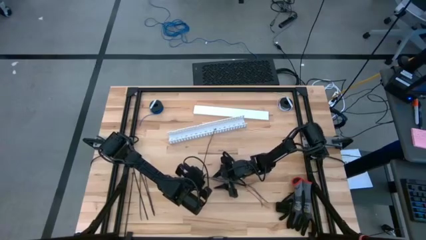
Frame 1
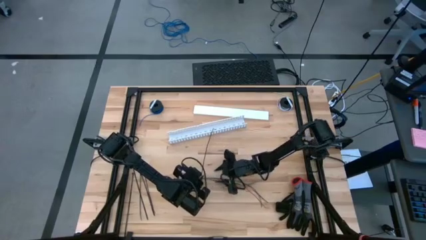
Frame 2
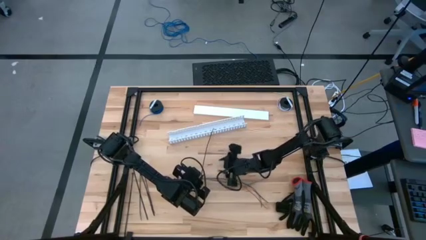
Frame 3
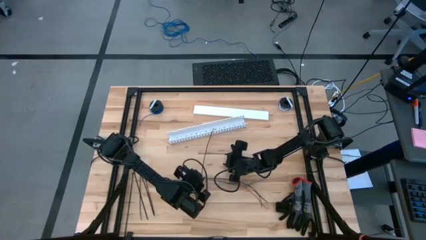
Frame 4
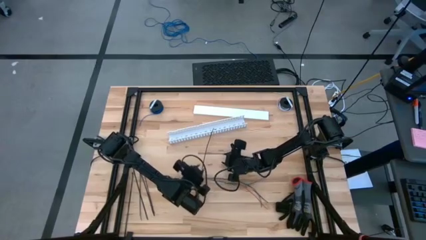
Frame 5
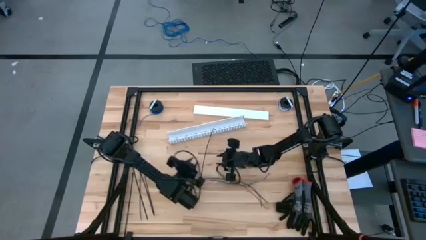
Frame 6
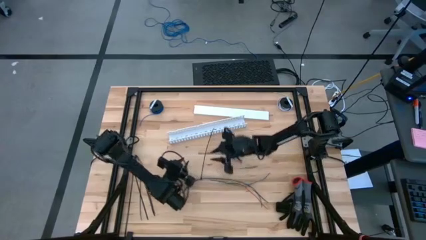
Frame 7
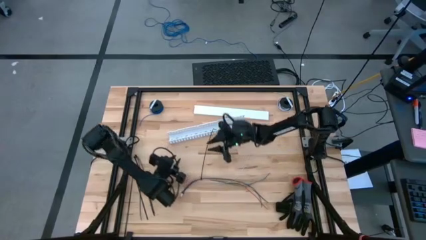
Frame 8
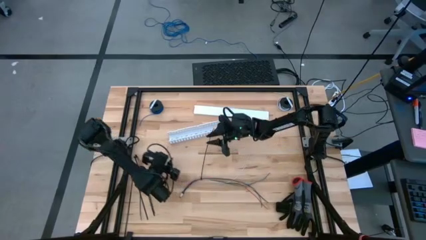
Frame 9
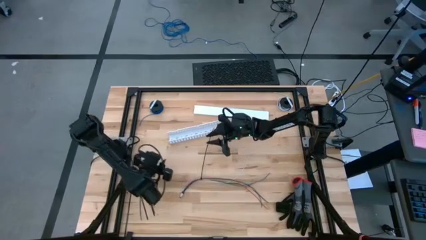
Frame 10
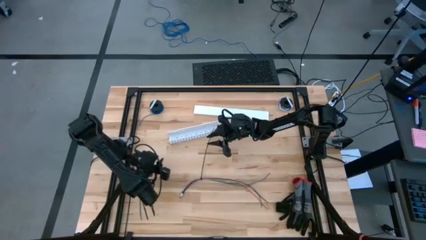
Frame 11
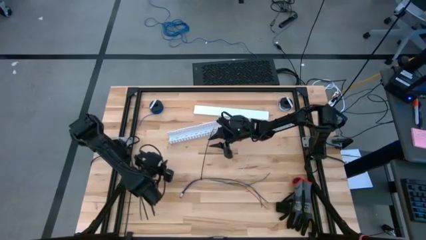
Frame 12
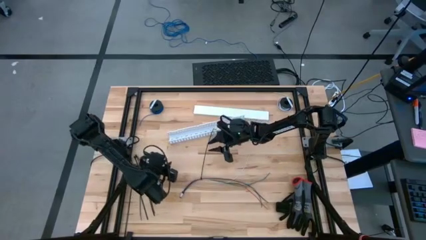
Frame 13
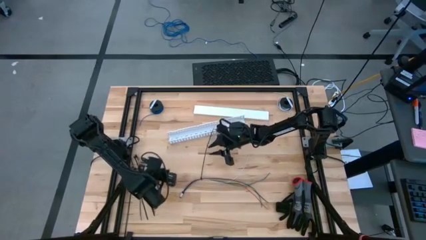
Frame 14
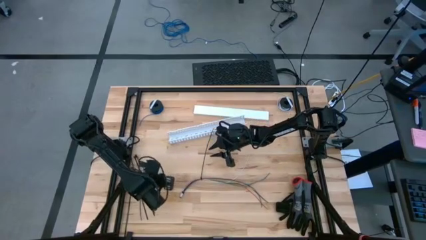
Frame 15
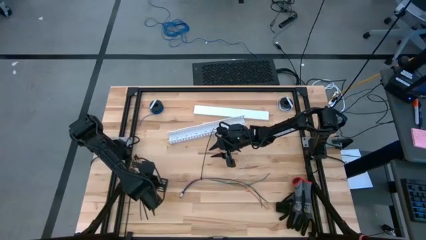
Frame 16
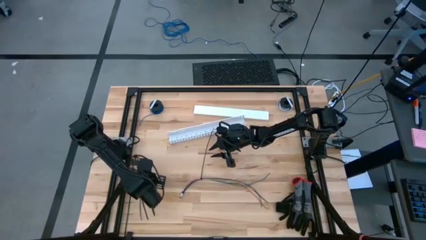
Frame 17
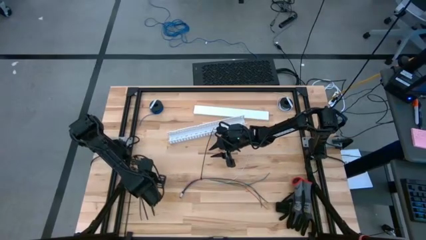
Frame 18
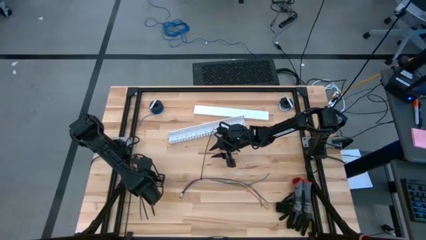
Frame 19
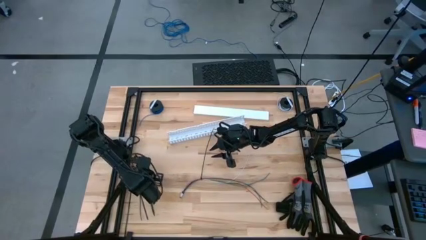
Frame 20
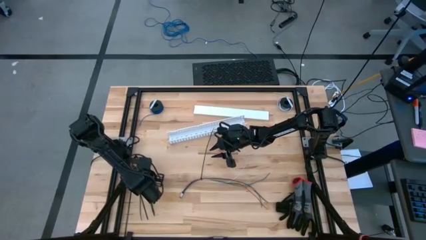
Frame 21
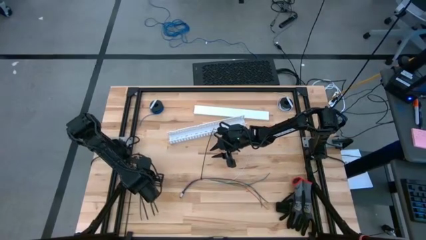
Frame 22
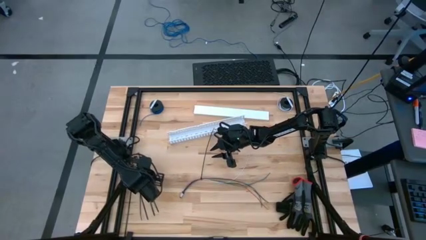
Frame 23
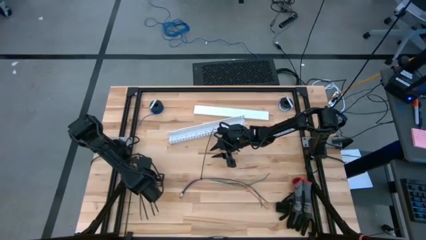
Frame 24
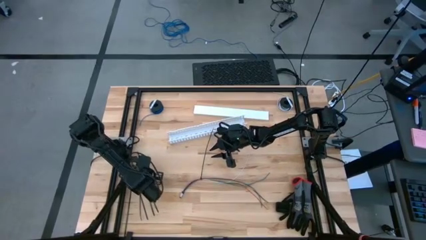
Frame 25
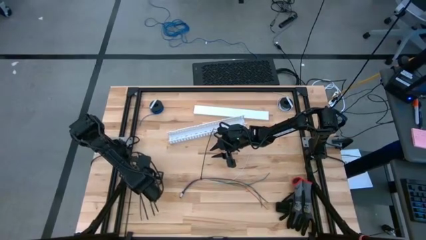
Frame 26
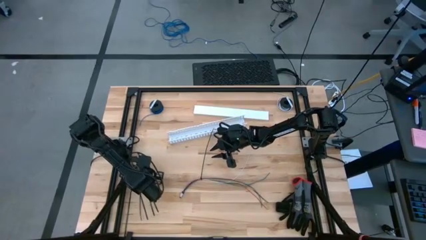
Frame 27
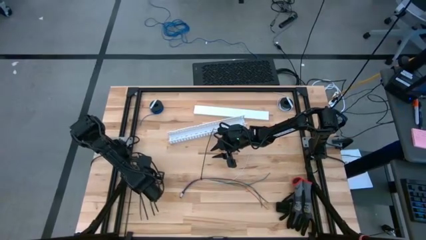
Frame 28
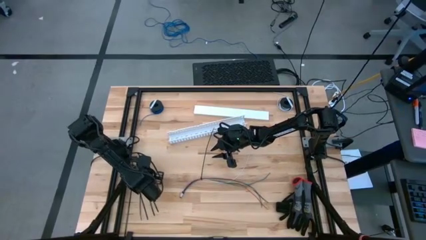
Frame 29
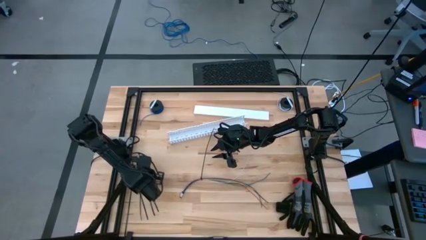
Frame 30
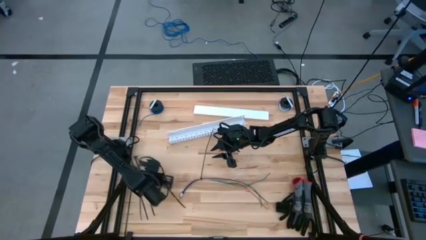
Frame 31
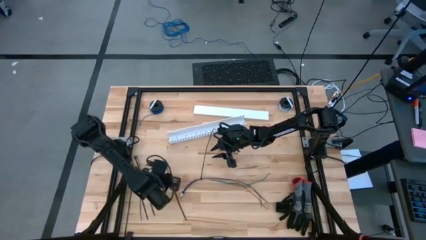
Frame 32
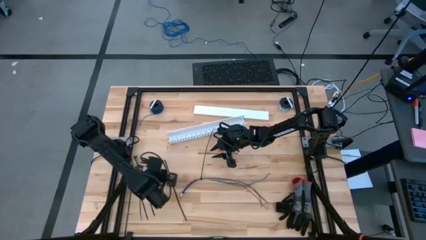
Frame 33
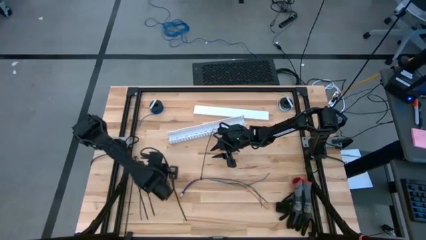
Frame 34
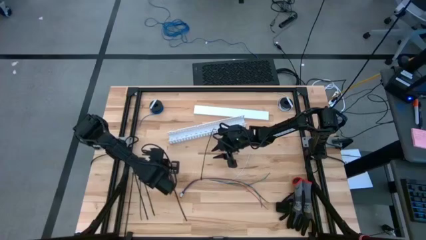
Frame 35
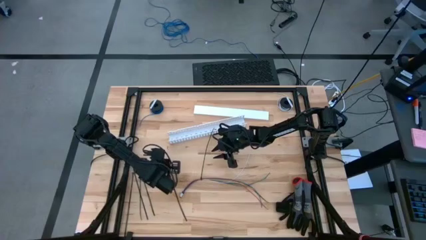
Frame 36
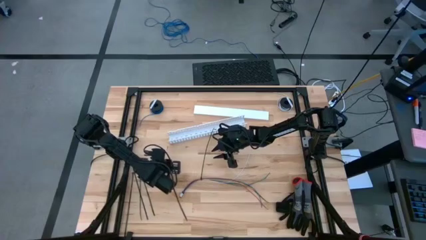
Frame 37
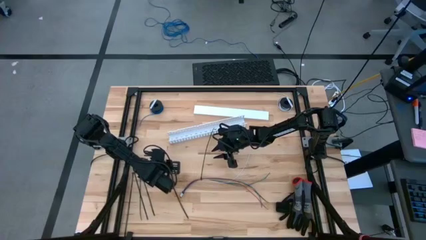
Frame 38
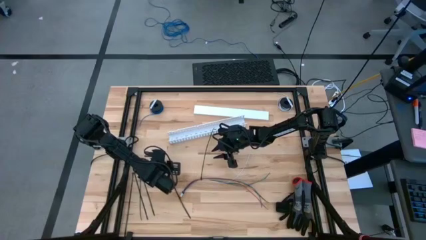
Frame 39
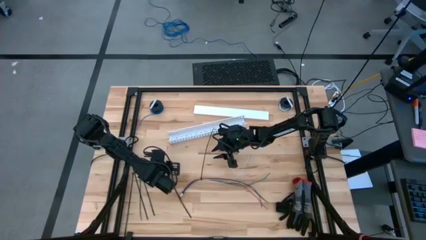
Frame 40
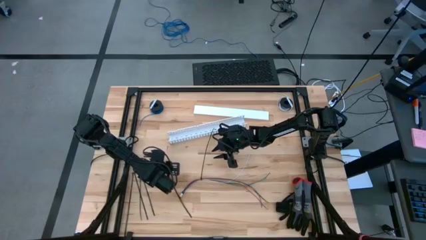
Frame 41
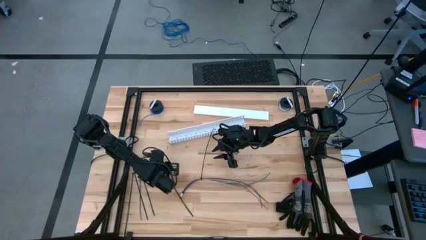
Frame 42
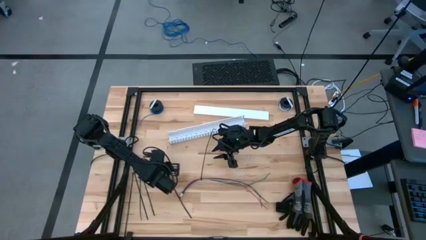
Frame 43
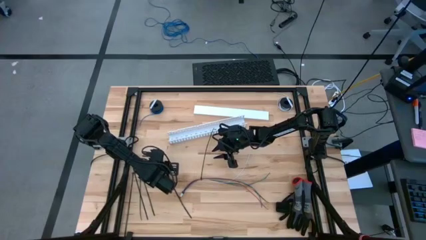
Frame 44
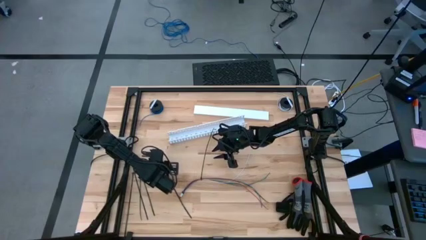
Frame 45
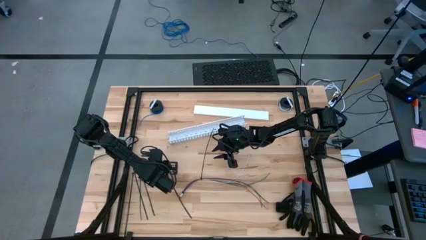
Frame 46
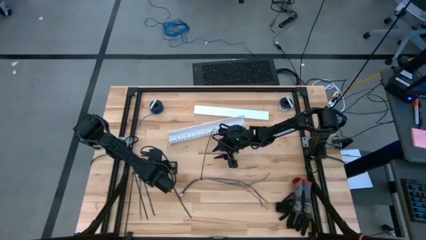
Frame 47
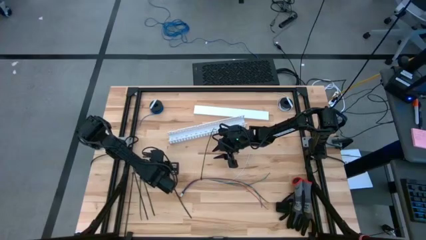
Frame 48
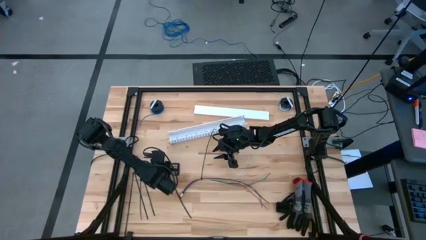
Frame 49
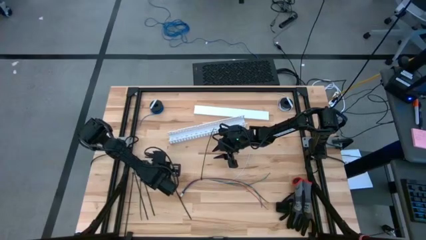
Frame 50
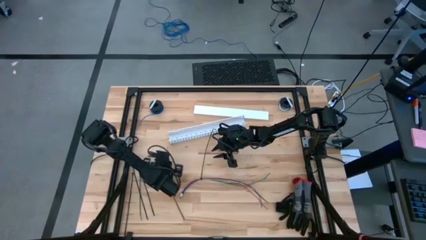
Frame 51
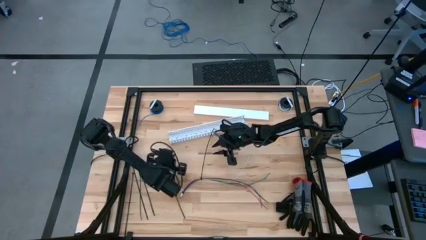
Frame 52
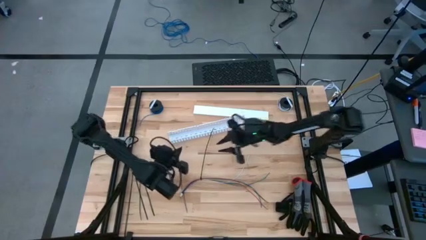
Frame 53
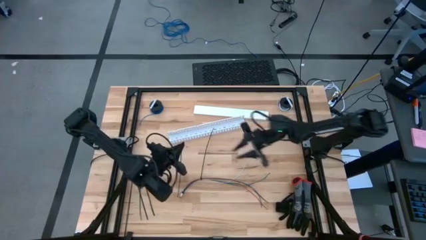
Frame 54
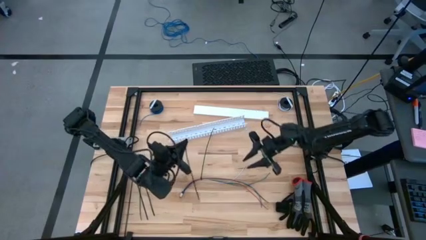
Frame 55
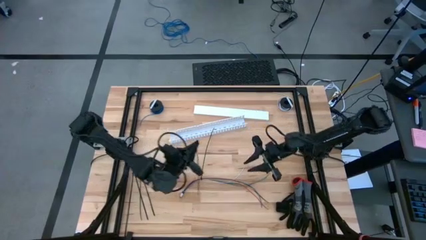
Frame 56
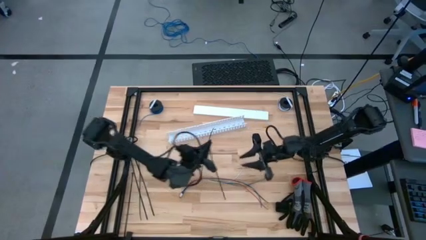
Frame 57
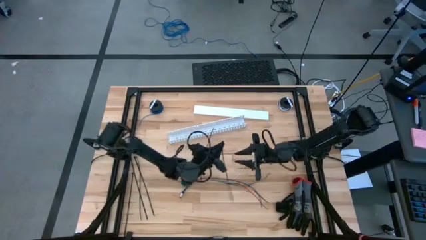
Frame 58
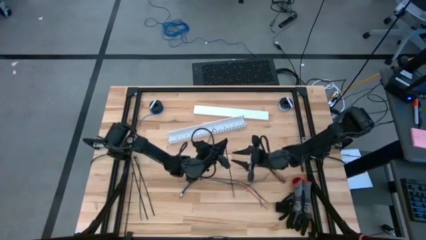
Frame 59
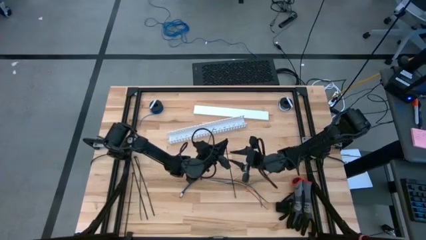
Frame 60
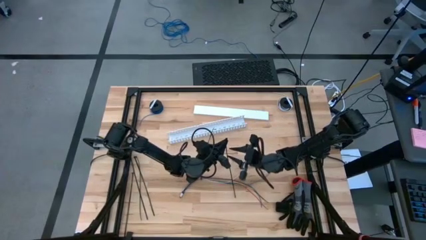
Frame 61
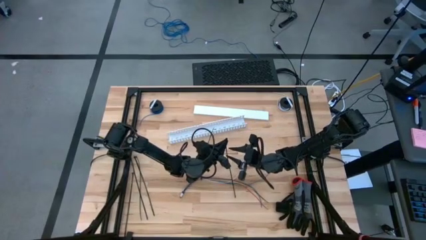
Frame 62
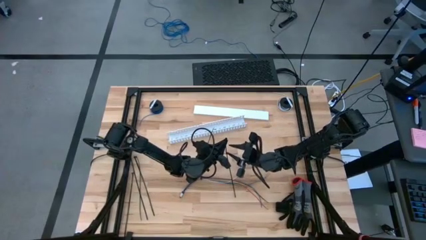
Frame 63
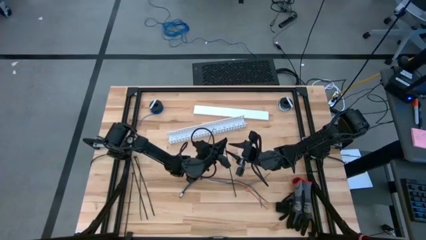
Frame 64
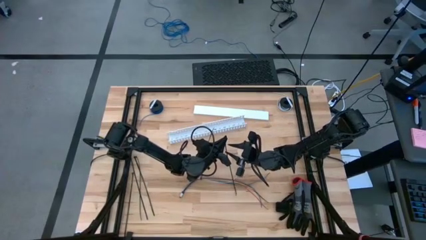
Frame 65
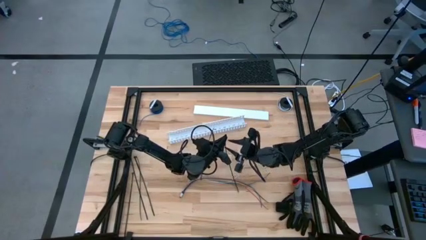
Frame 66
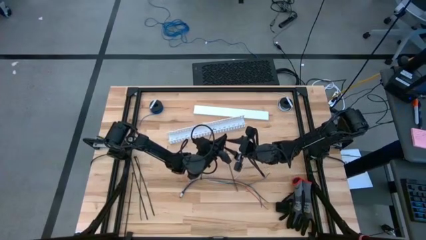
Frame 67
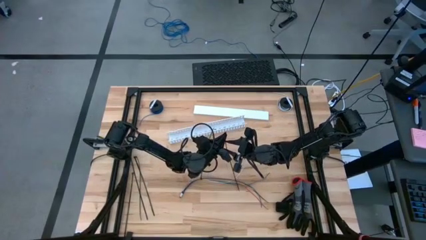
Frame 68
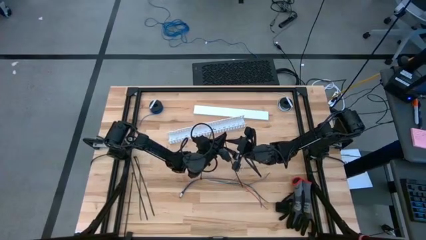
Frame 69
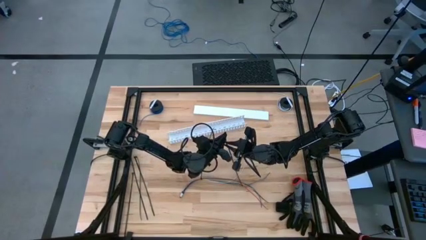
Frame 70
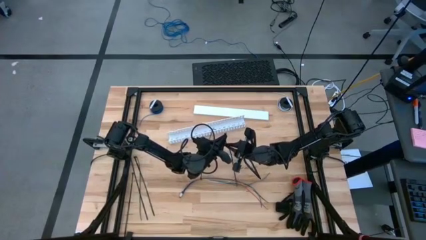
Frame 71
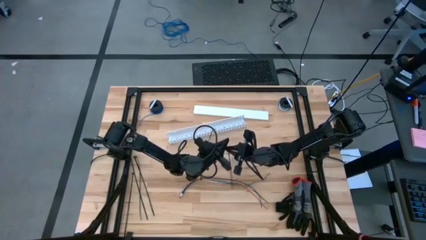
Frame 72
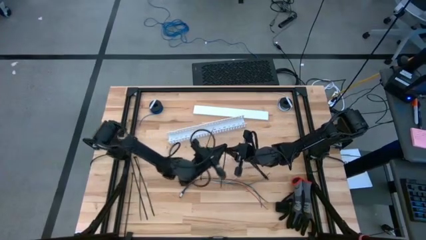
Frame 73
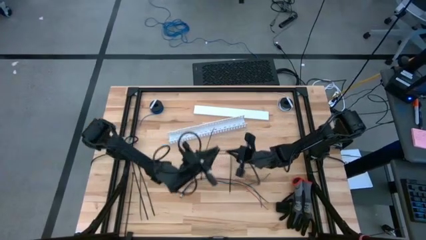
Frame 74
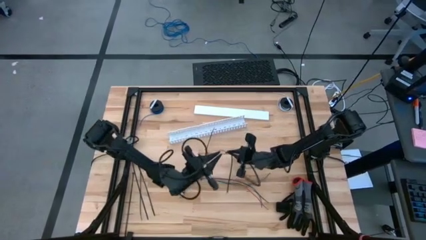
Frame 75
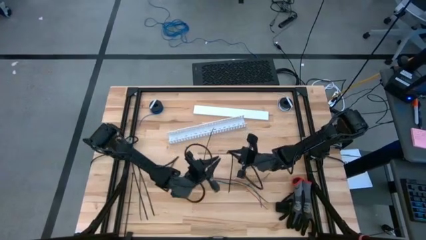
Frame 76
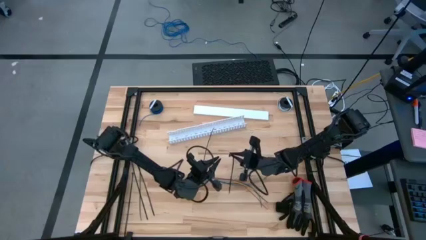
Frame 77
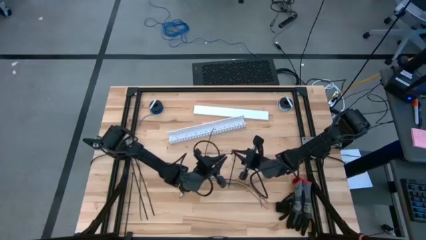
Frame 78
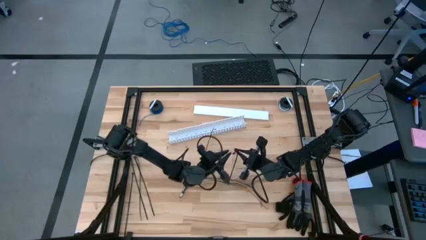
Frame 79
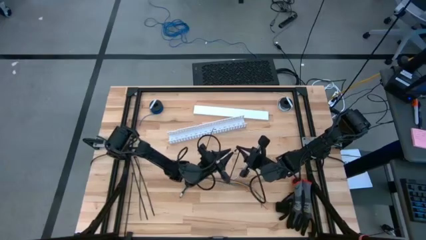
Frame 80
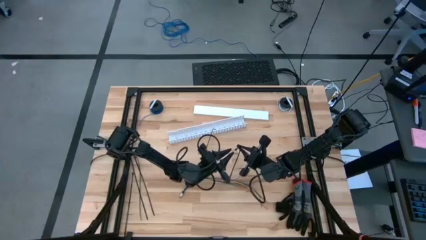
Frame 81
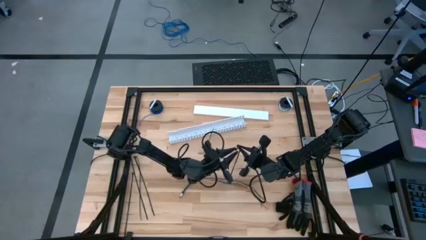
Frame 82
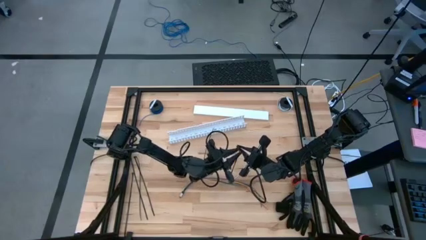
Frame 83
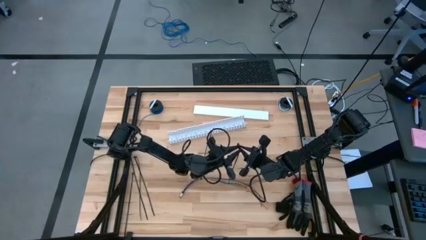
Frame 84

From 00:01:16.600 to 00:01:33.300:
Task: Ziptie cables
Wrap the colored loose cables with the black zip tie

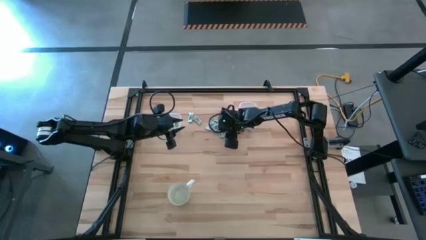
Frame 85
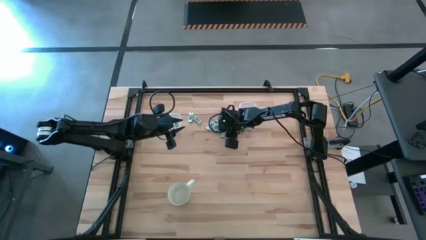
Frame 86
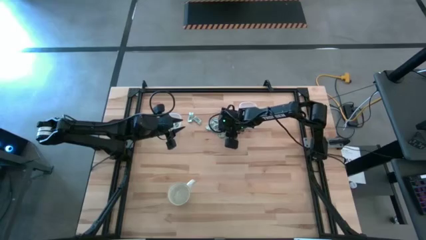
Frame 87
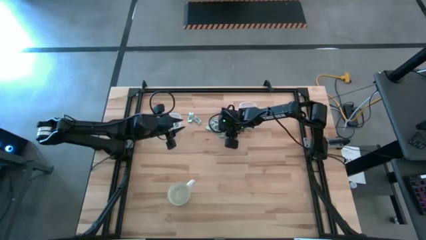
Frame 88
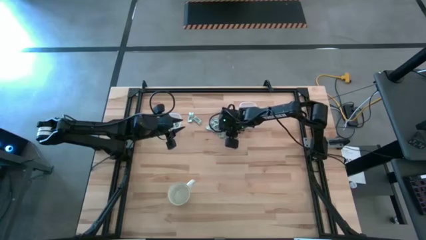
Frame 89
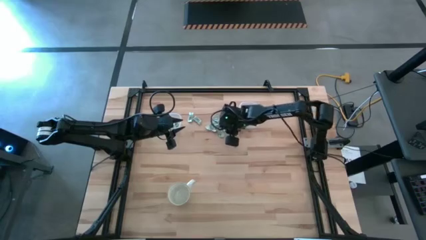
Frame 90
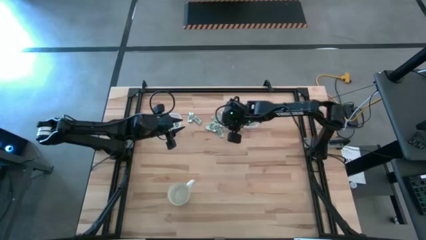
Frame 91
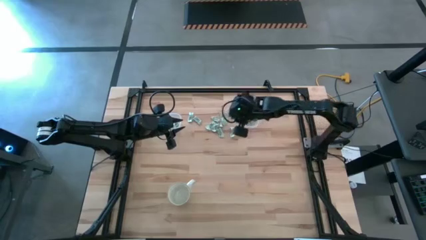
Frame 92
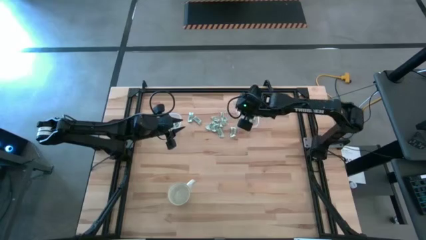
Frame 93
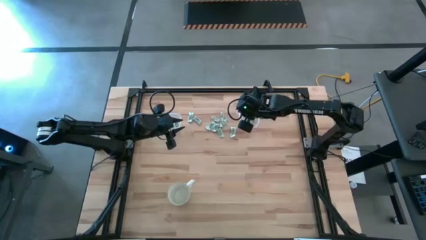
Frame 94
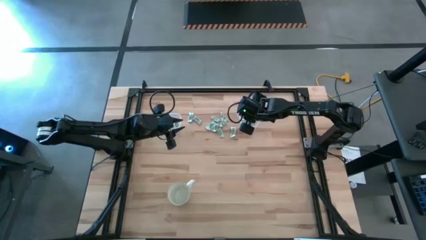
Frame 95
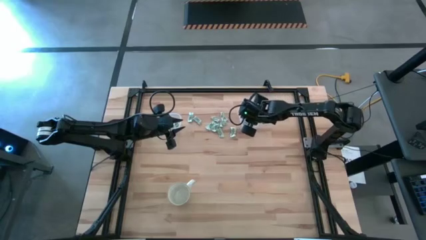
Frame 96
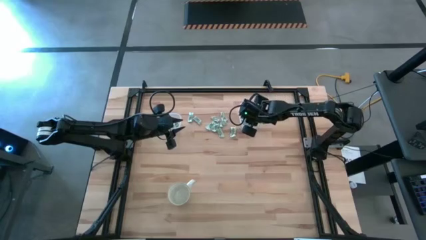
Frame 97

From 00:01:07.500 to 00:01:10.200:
Task: Pick and place items into bin
Put the green stevia packet into the rectangular transparent bin
